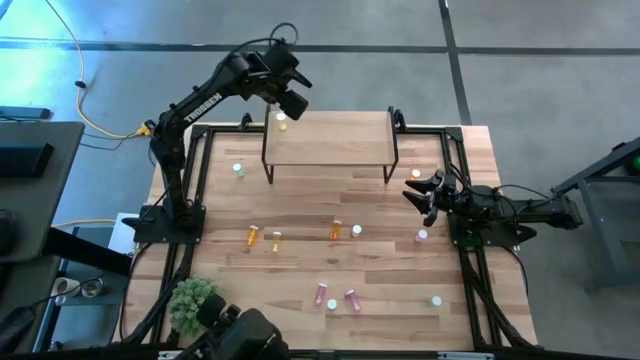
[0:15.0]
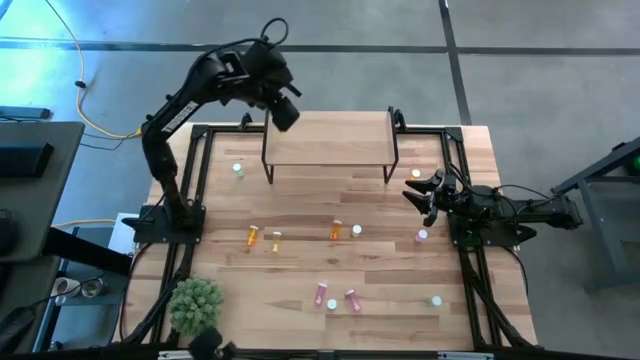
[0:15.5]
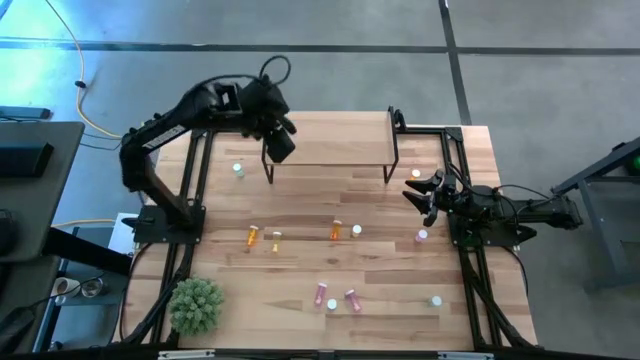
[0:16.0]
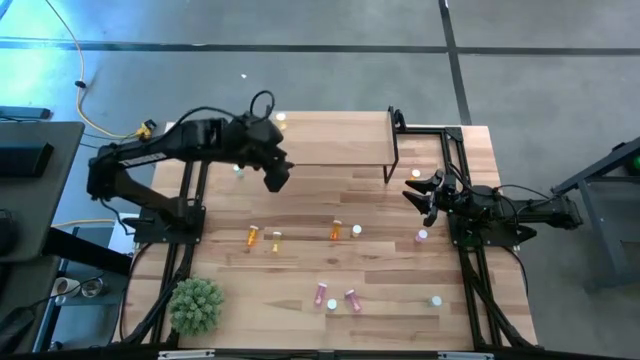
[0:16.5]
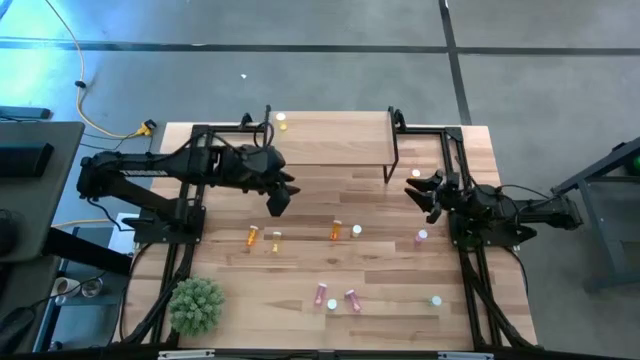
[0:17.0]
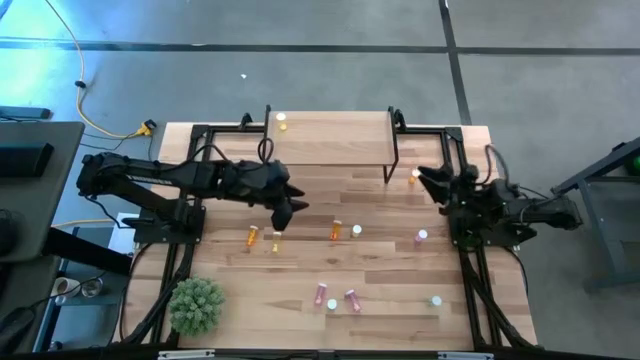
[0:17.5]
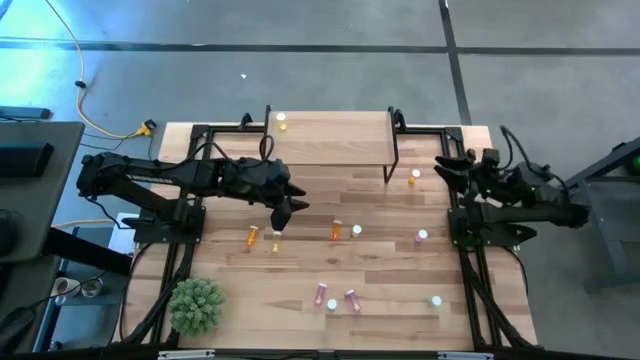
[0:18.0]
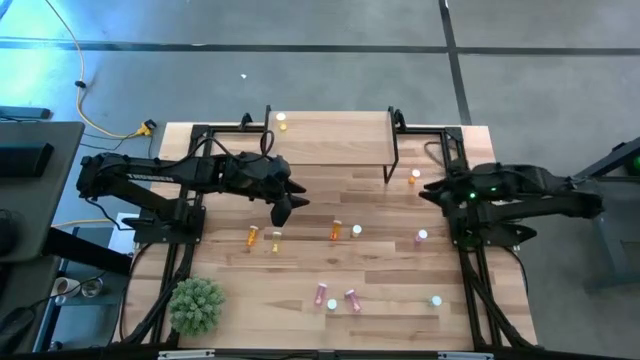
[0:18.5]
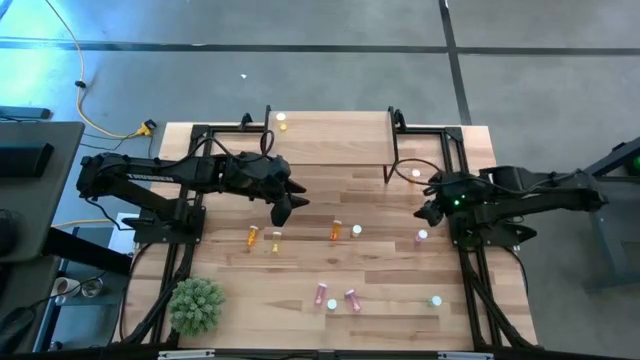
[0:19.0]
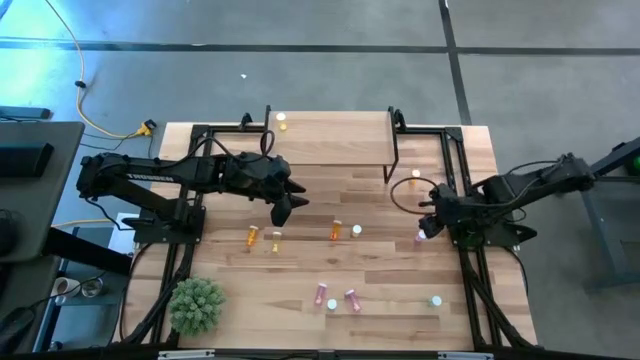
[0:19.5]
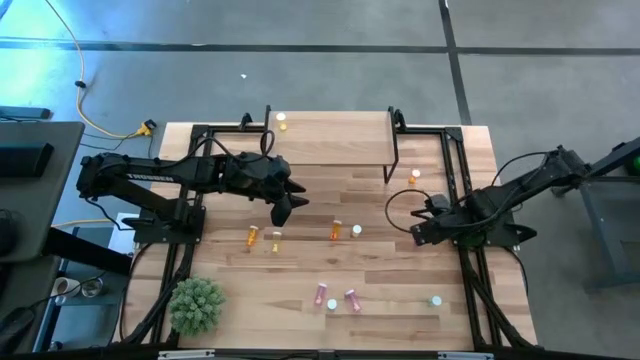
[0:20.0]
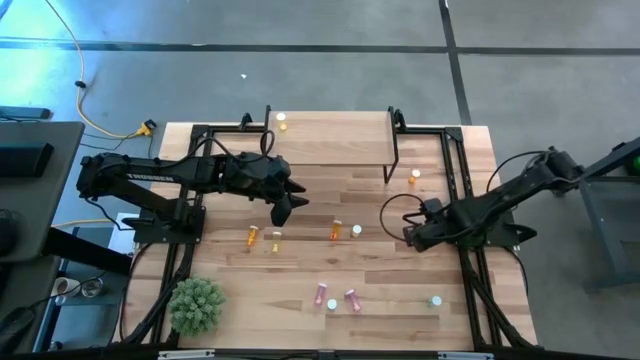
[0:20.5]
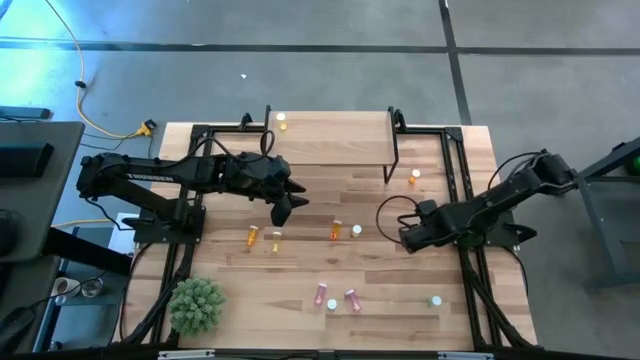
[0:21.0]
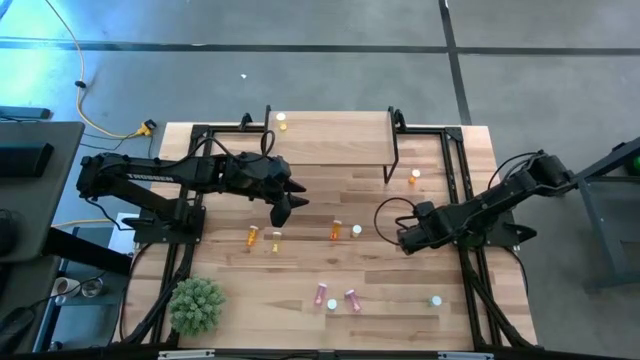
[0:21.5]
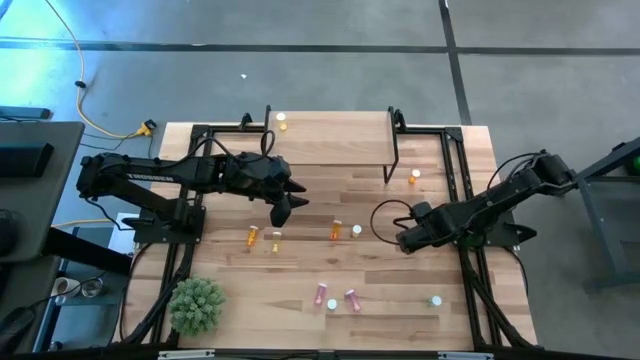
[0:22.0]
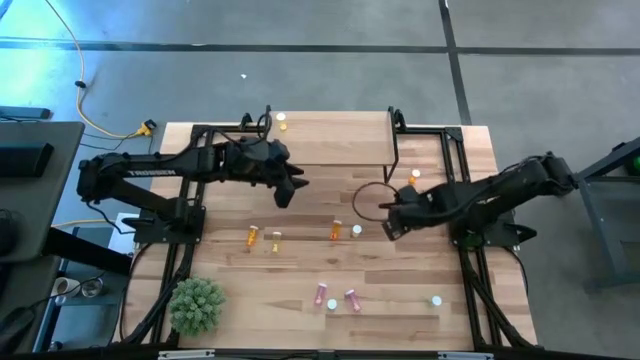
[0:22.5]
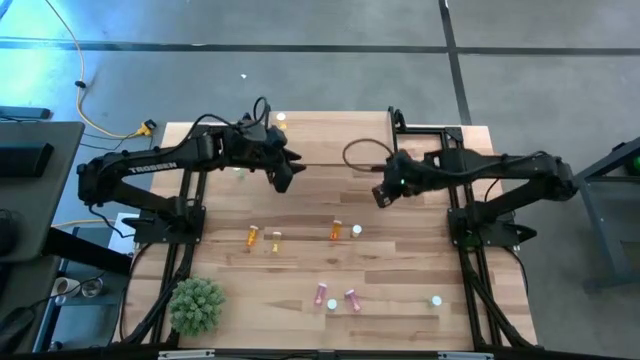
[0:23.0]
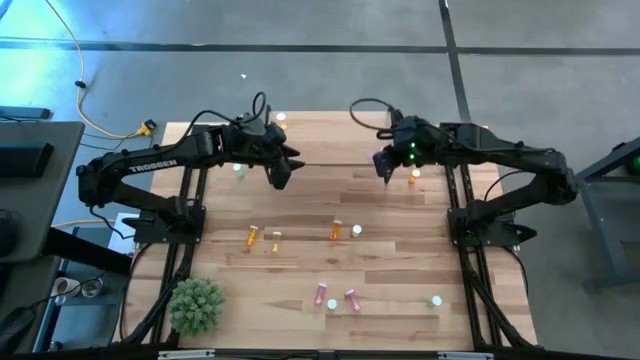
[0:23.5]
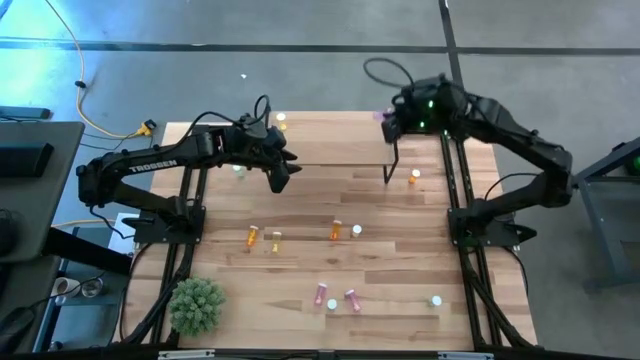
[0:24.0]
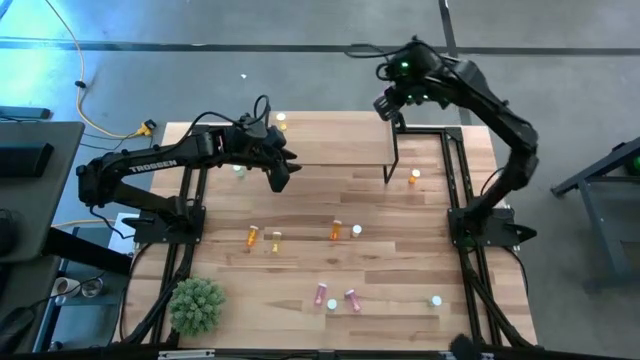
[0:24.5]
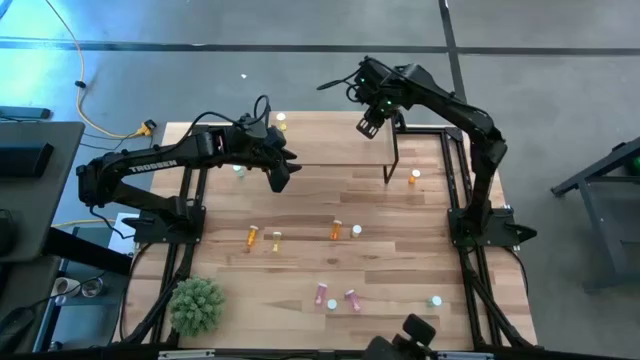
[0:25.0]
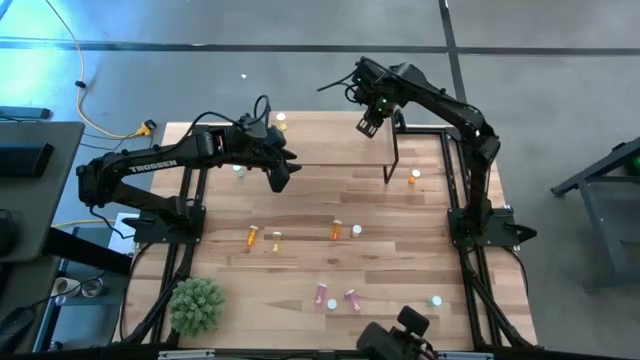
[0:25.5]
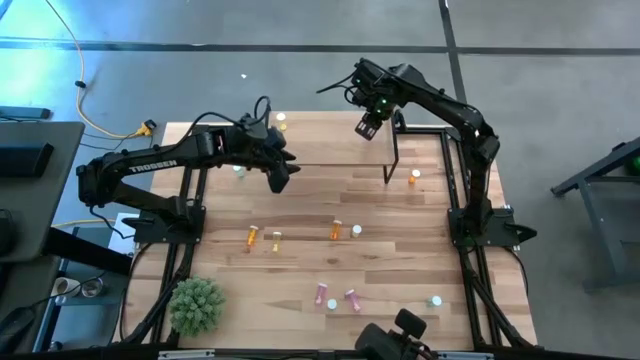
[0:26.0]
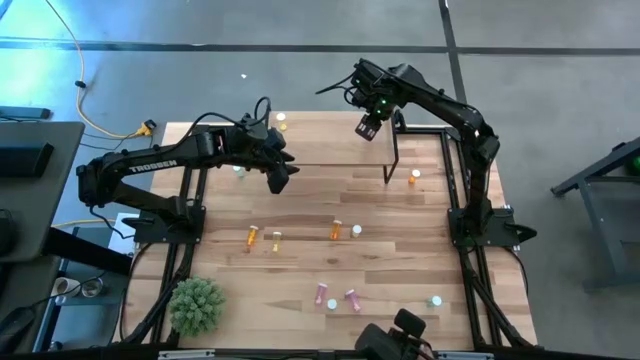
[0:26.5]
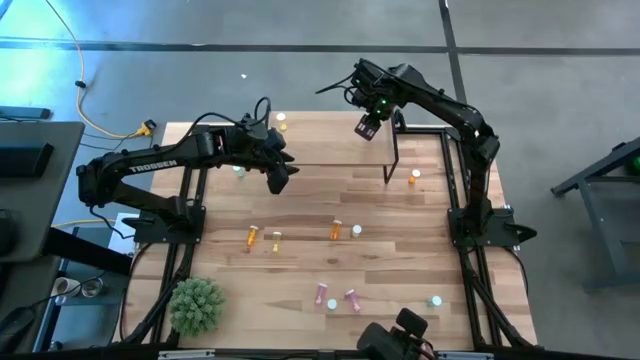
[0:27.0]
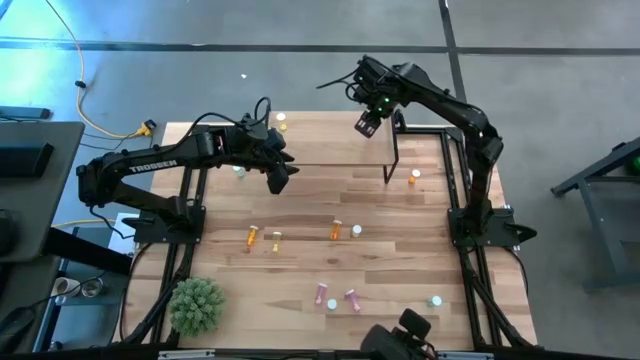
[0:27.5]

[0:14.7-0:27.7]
Task: Pick and place medicine bottles onto shelf by color
Put the top pink pill bottle on the shelf

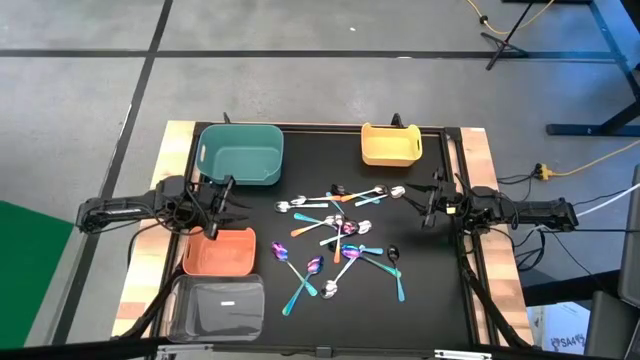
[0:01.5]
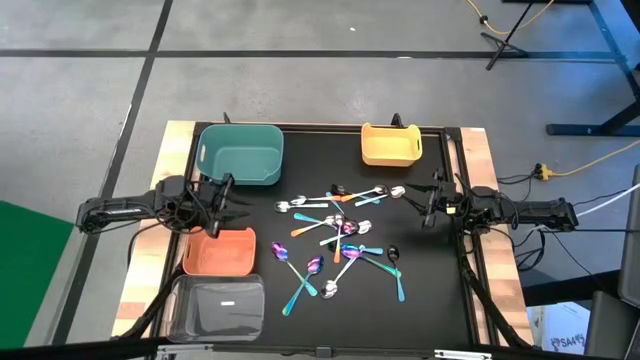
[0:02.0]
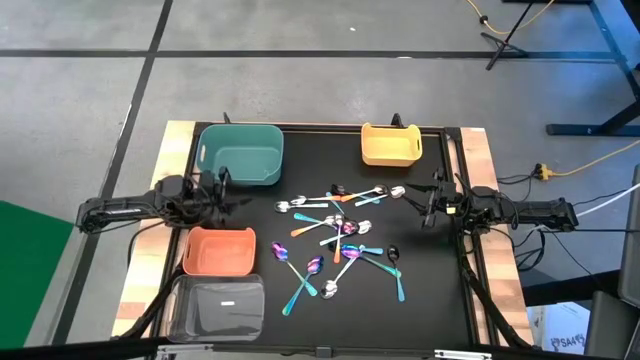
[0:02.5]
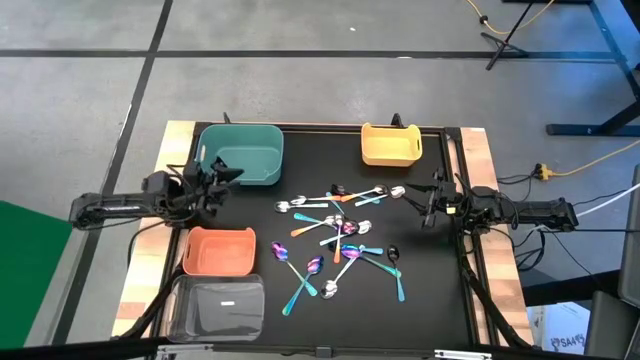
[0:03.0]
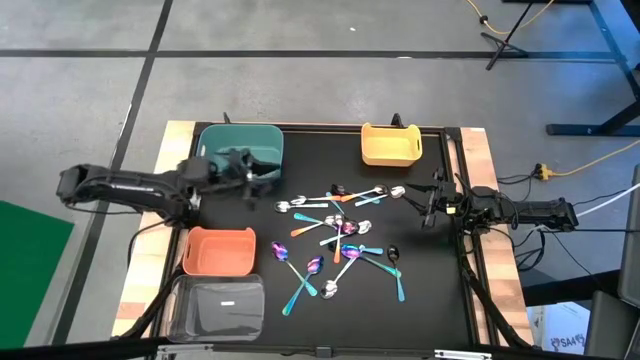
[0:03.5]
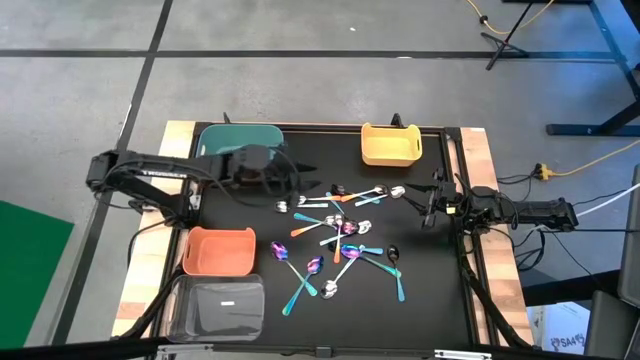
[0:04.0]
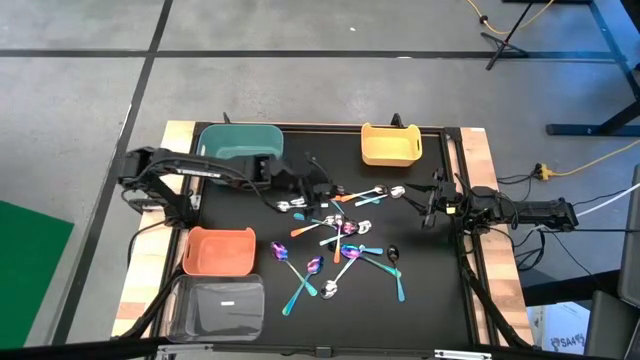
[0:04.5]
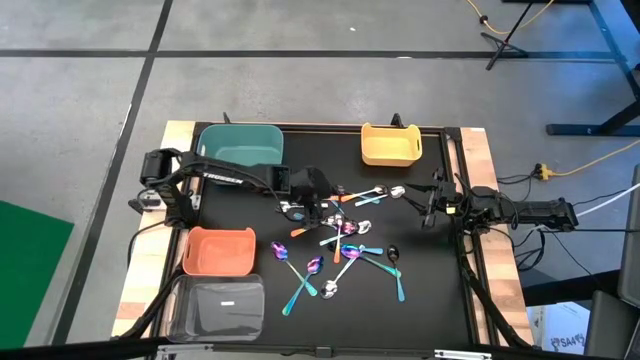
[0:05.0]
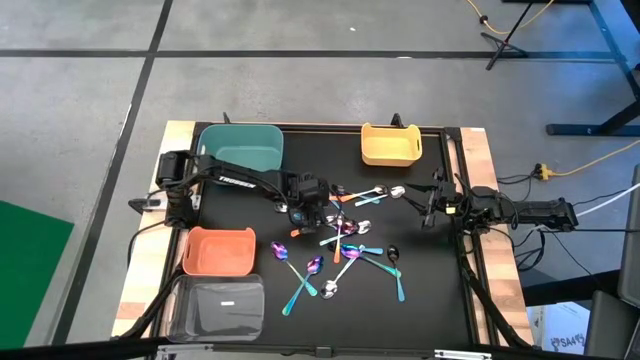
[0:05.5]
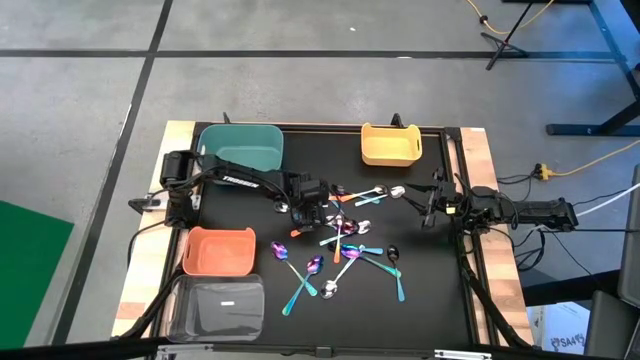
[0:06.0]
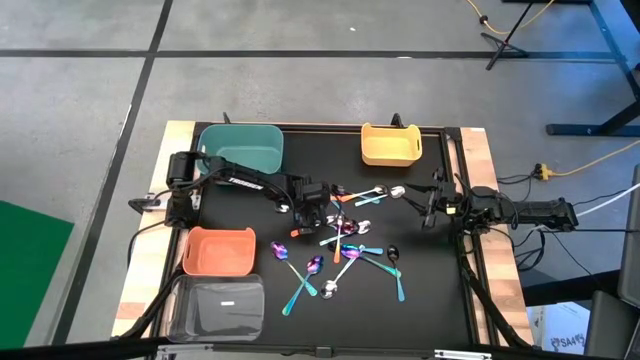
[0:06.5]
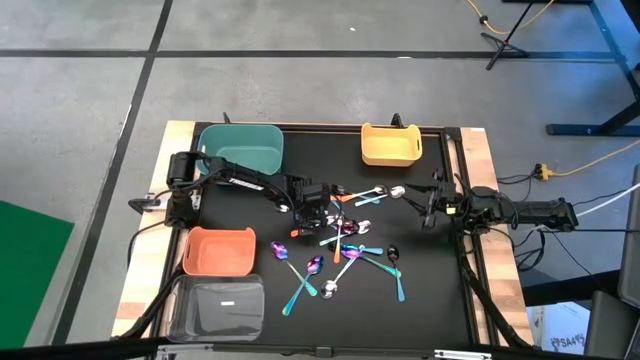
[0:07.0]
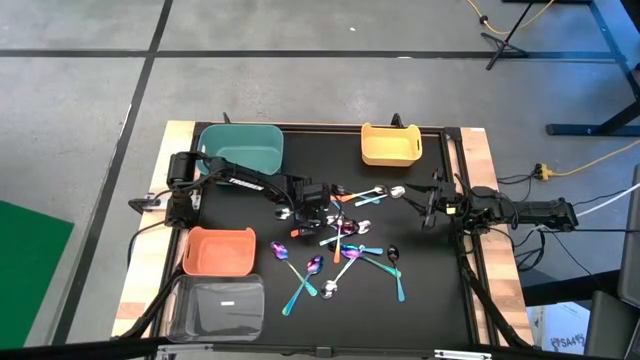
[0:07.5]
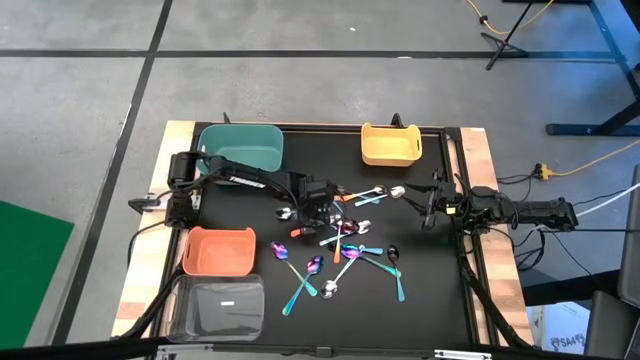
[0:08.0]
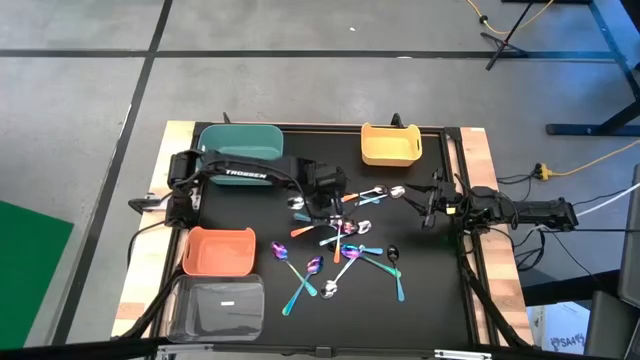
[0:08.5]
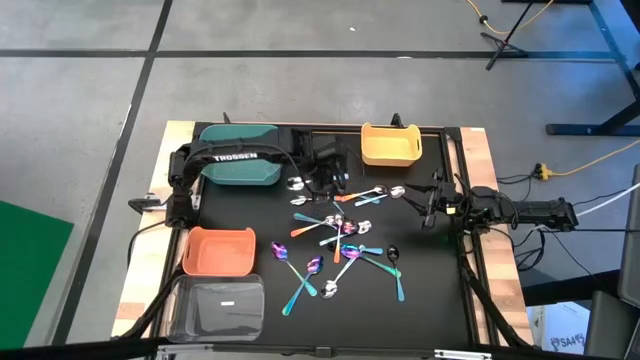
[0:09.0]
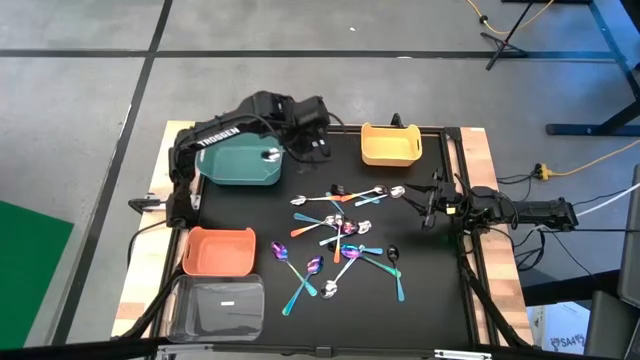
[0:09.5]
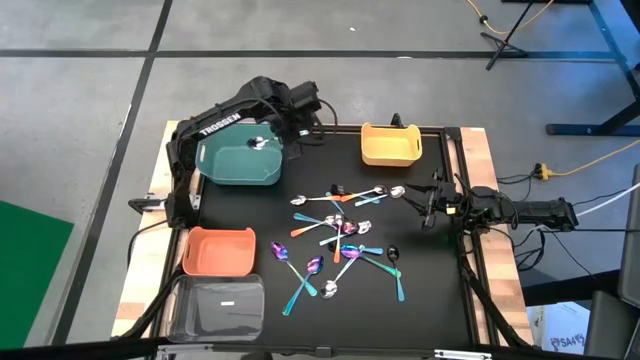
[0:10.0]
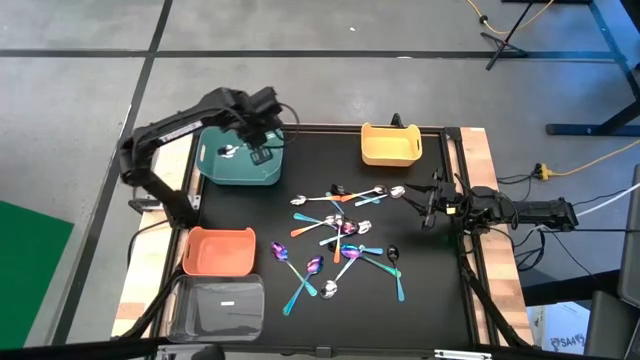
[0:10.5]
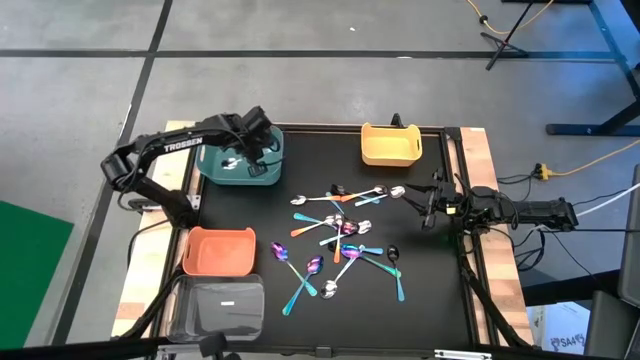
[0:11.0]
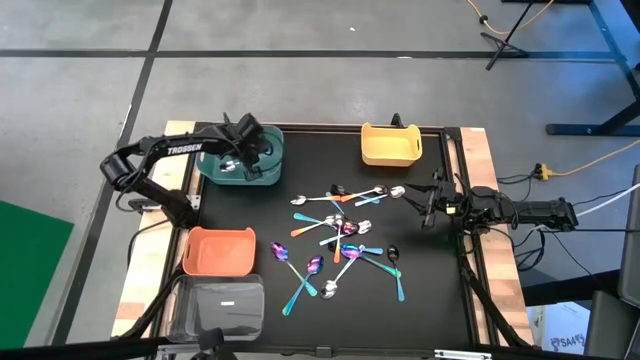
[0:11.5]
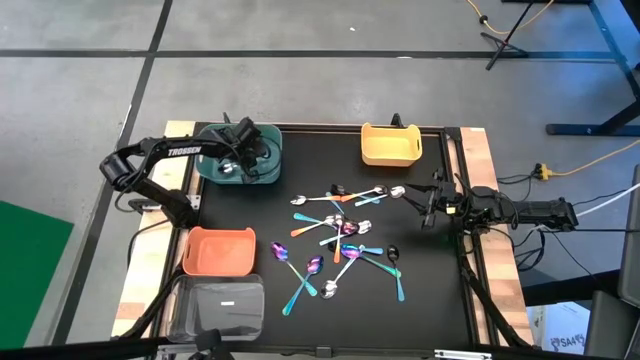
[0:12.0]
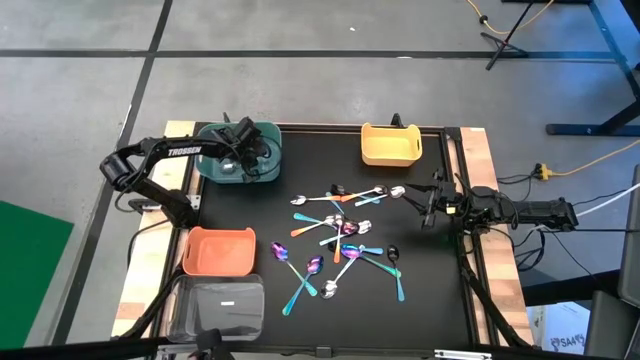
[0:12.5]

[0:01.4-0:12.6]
Task: Sort silverware by color (type)
Put the blue spoon into the blue bin
